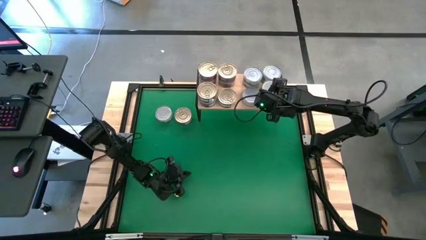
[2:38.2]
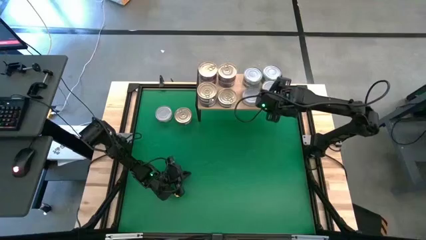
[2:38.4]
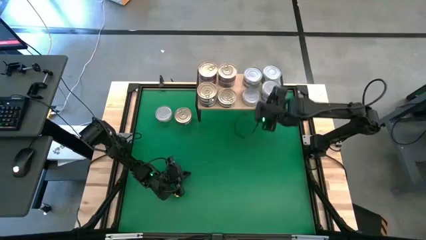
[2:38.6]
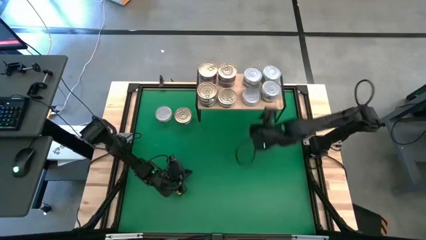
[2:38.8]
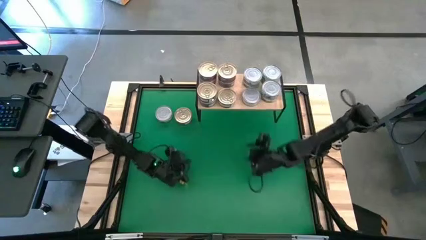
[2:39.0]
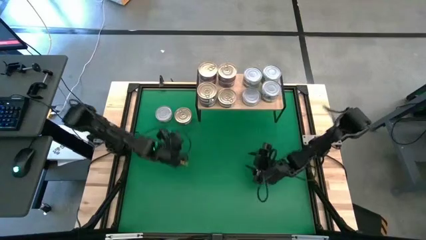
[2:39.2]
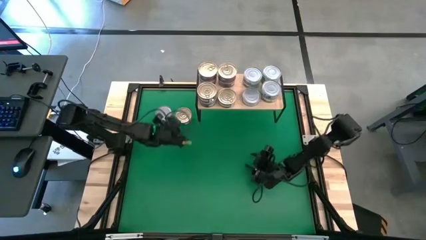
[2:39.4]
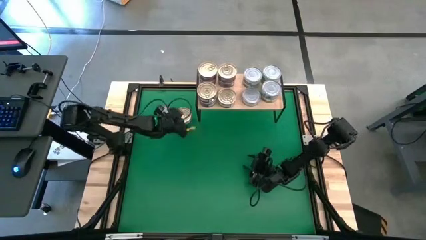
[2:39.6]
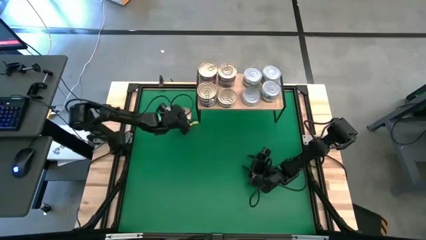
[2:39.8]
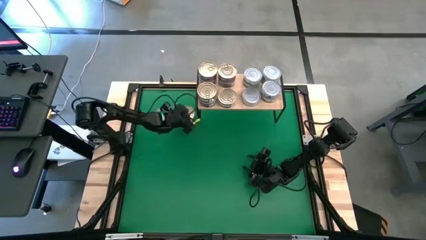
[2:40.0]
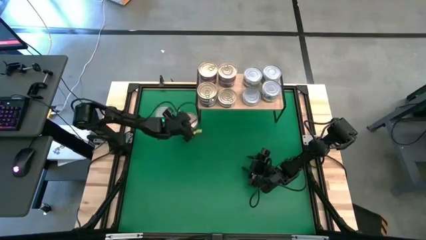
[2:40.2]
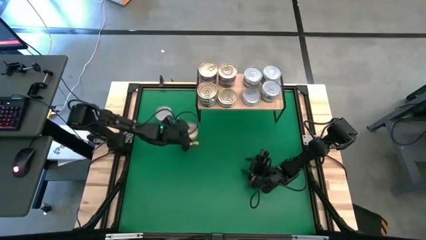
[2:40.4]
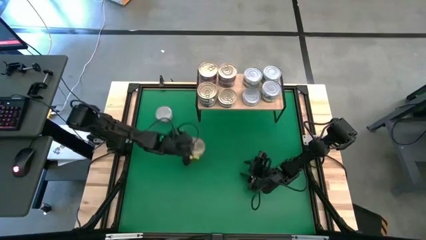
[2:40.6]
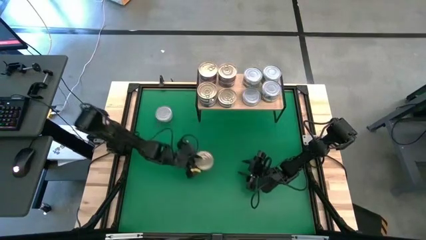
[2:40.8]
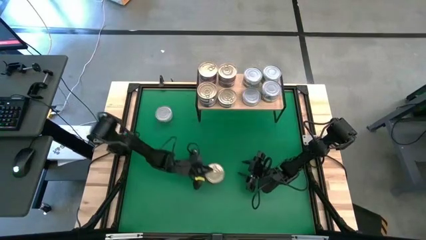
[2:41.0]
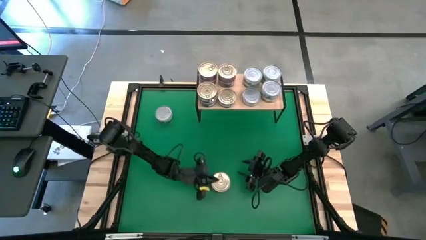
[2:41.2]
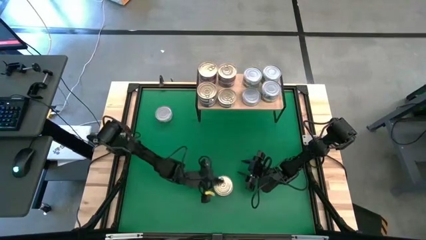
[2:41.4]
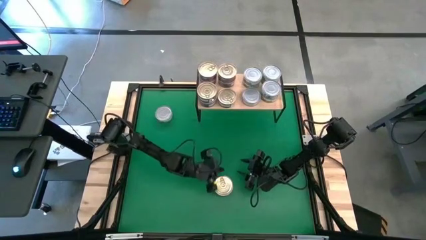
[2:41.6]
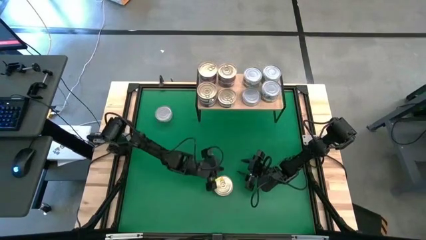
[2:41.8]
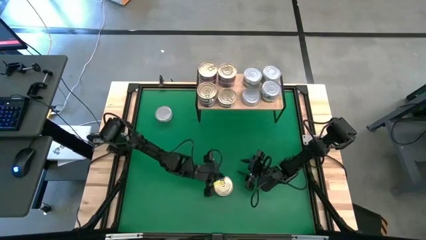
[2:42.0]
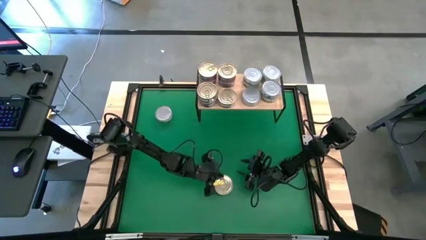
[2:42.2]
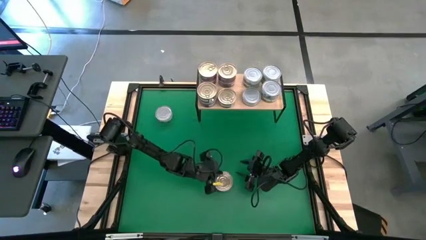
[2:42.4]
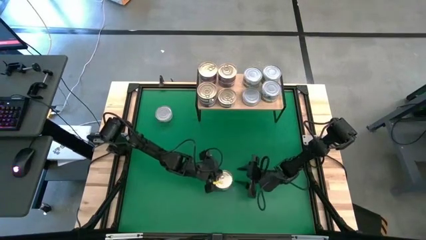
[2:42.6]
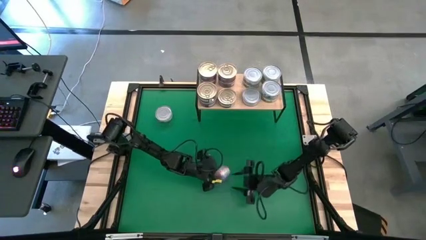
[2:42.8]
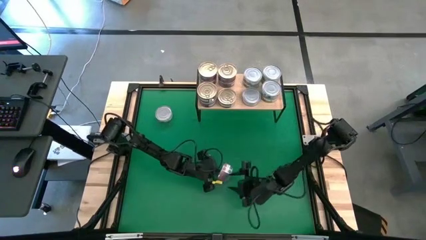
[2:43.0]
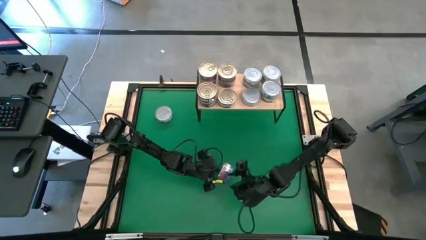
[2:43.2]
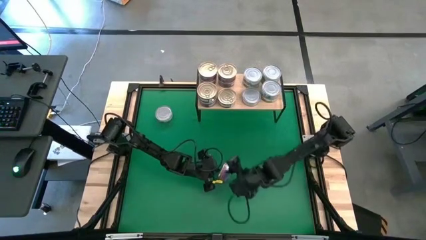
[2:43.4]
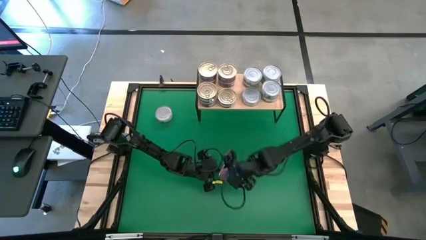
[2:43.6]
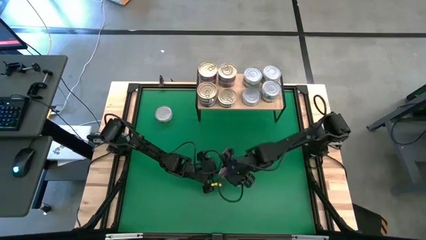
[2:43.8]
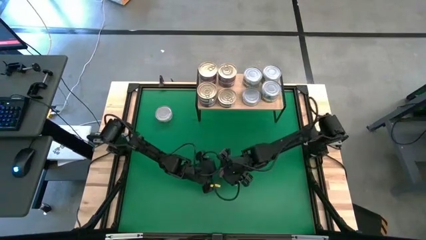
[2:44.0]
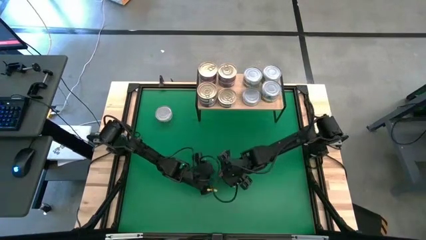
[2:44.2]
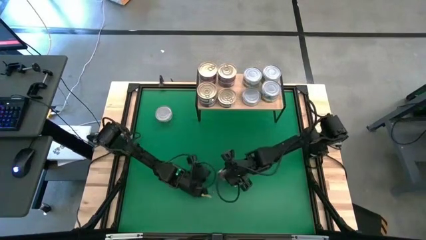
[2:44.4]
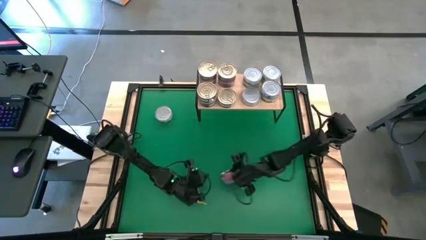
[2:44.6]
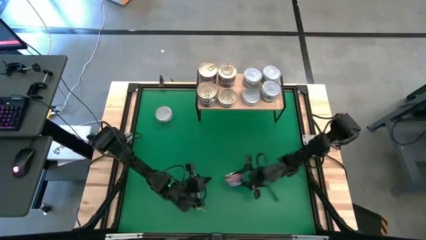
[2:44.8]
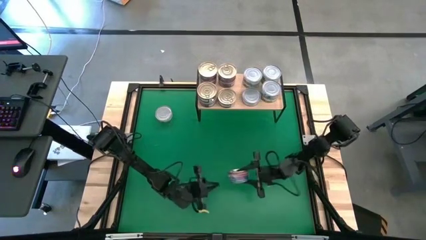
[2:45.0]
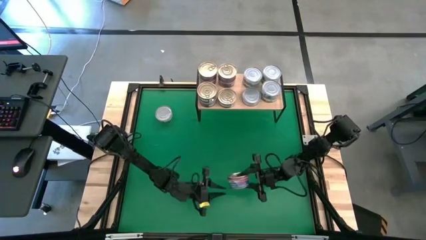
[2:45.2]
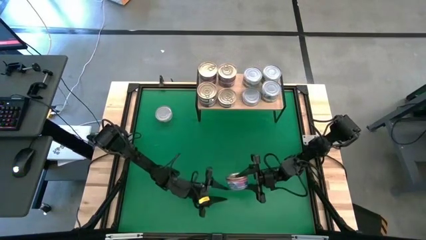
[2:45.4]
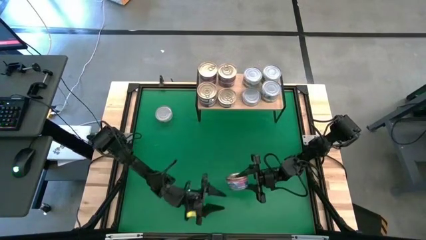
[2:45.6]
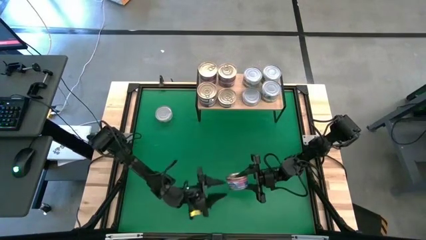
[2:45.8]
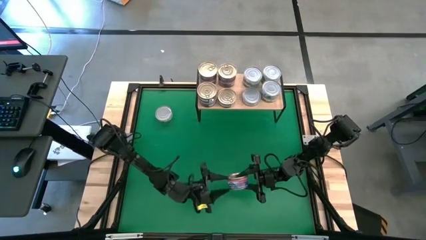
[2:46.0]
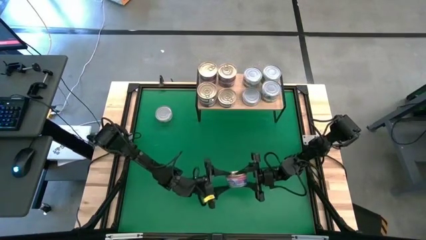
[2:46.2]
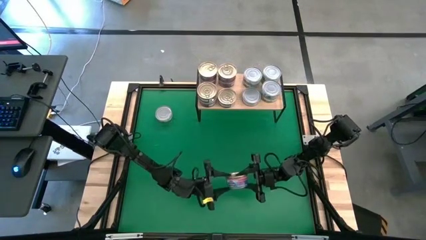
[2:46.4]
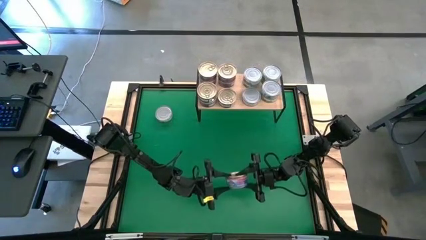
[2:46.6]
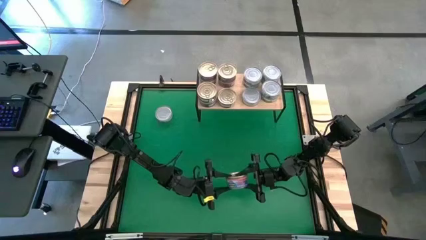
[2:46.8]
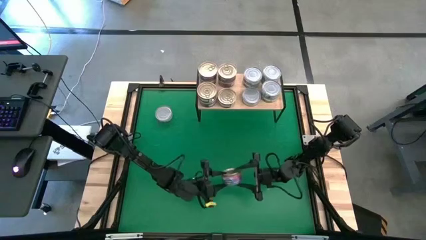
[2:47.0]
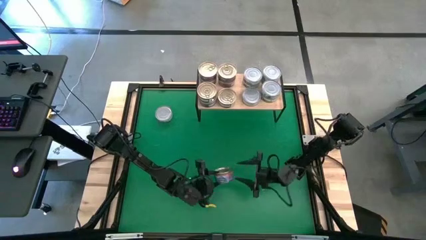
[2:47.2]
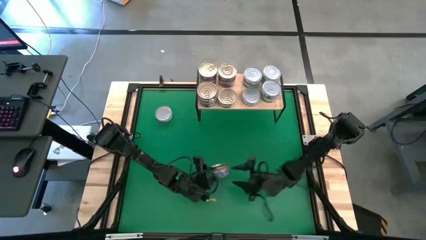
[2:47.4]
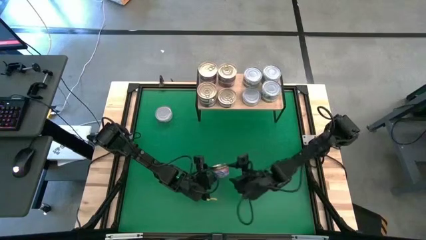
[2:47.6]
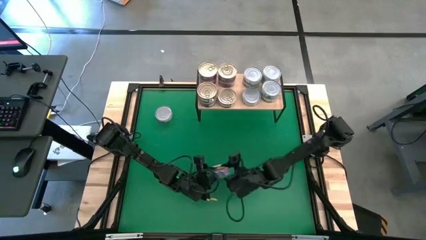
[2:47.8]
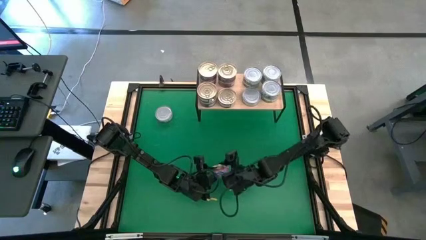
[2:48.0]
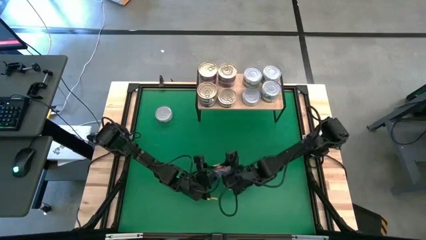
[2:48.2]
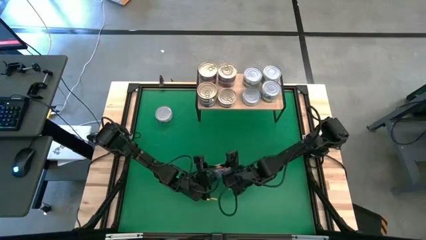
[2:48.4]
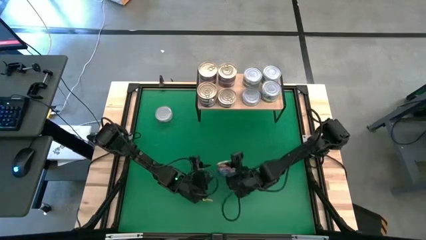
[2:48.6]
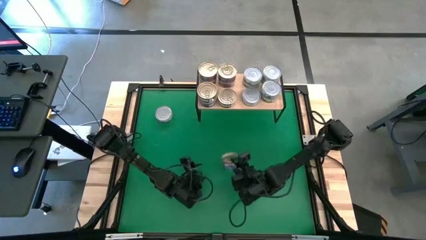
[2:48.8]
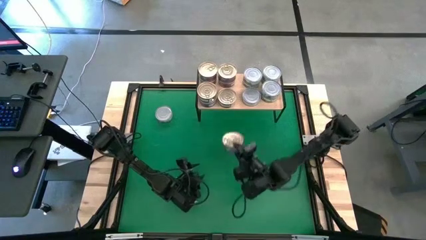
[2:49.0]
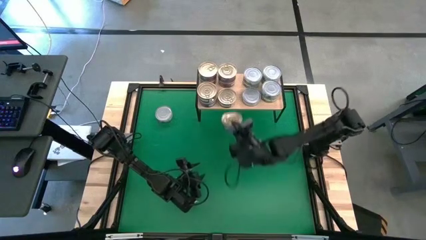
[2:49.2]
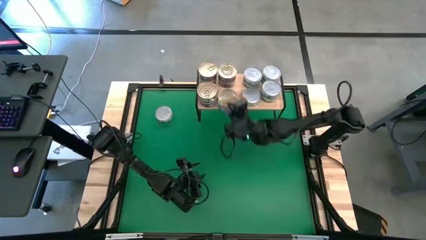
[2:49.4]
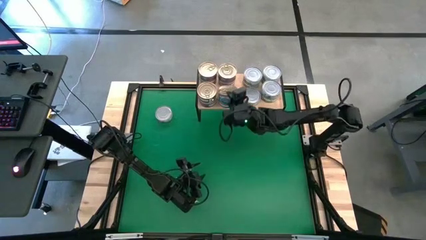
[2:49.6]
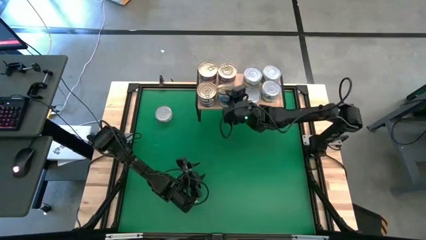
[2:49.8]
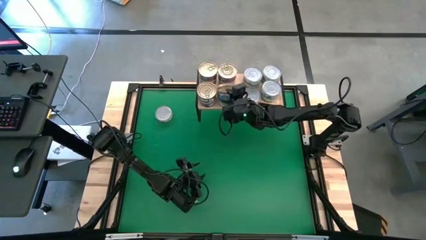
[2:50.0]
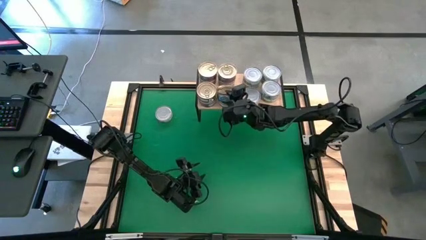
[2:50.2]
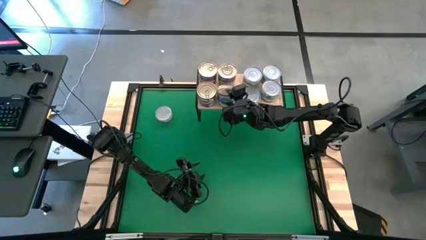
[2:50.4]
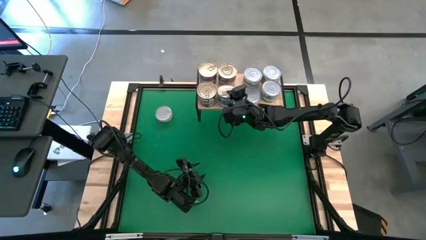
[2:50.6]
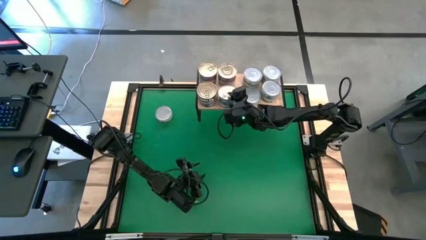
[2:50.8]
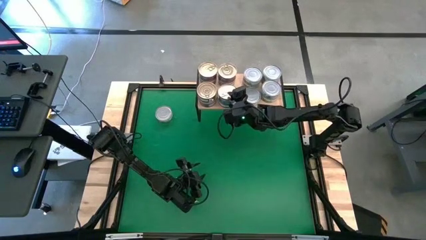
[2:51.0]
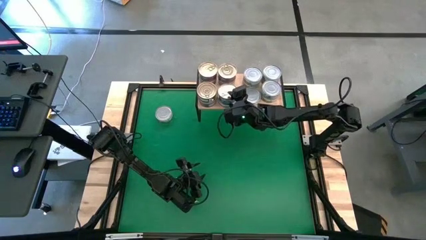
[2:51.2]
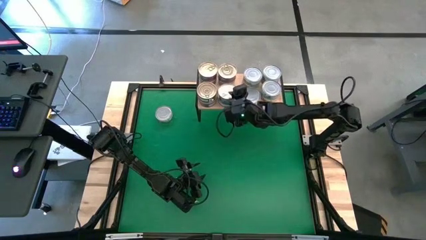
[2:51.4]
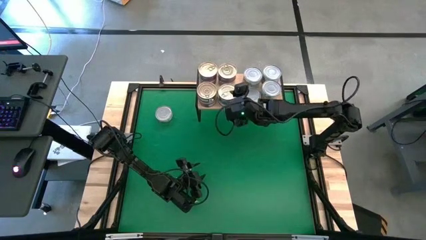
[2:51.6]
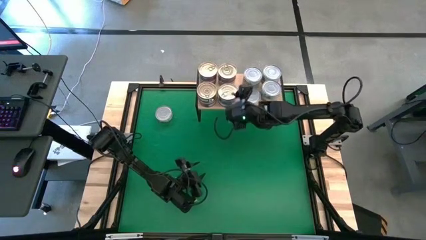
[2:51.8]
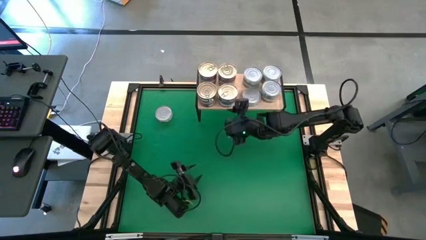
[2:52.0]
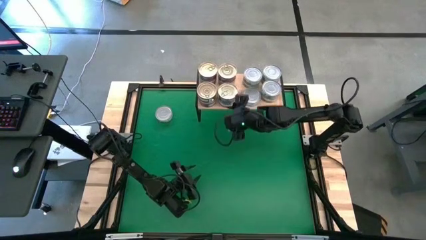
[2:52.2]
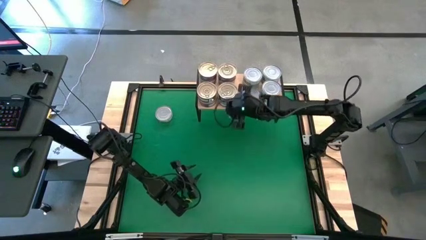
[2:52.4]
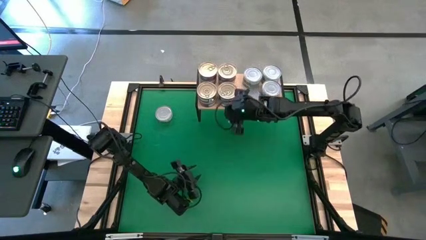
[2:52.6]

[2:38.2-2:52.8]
Task: Stack canned seafood by type on shelf
Stack the blue pink tuna can on top of the bottom right blue pink tuna can on the shelf

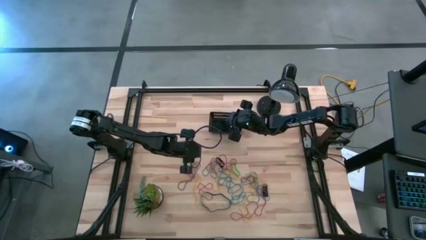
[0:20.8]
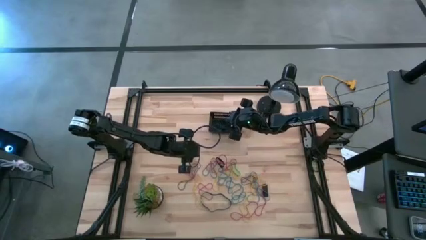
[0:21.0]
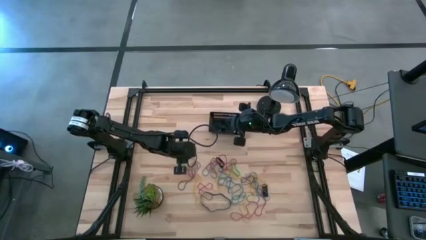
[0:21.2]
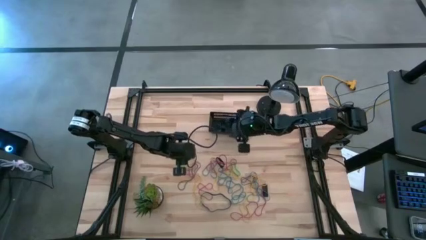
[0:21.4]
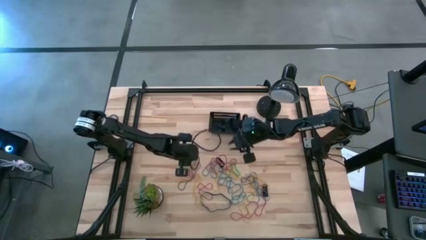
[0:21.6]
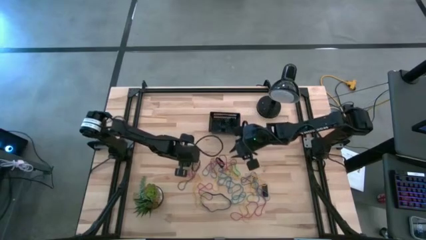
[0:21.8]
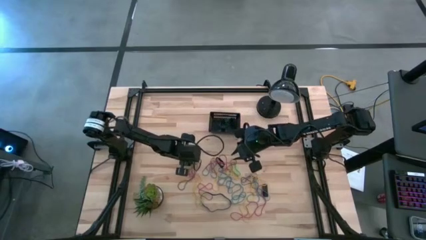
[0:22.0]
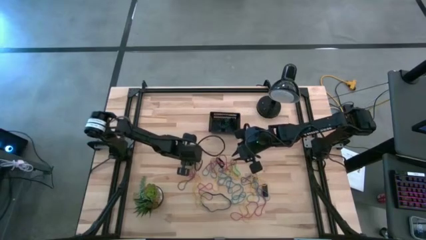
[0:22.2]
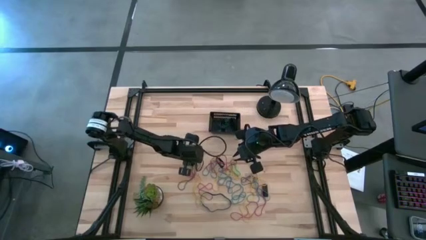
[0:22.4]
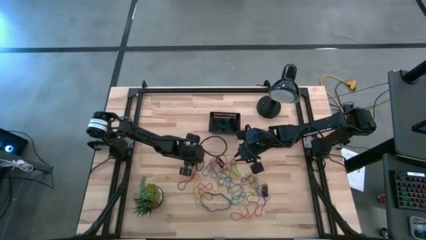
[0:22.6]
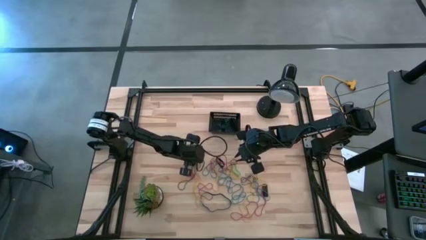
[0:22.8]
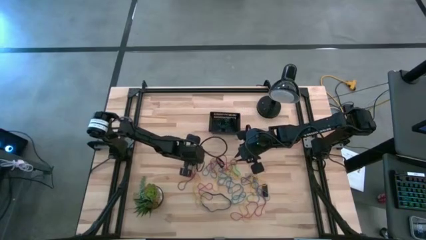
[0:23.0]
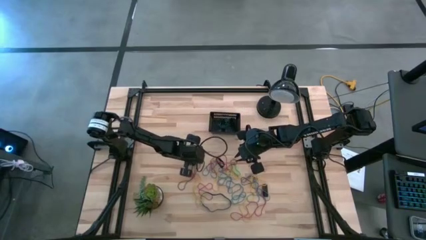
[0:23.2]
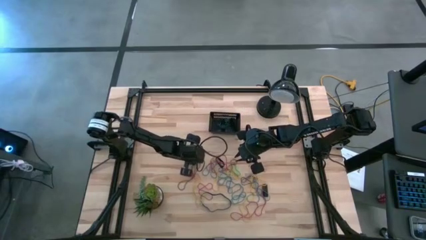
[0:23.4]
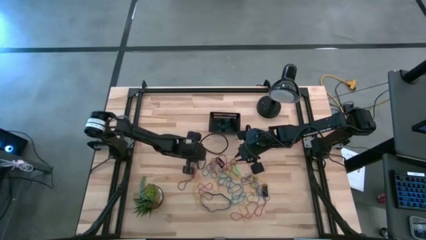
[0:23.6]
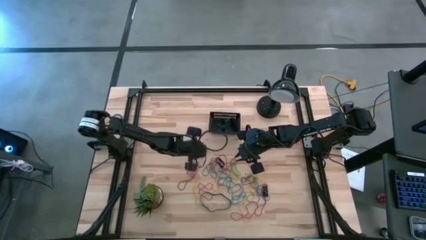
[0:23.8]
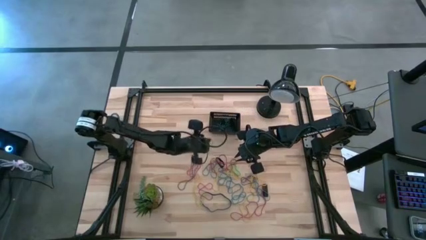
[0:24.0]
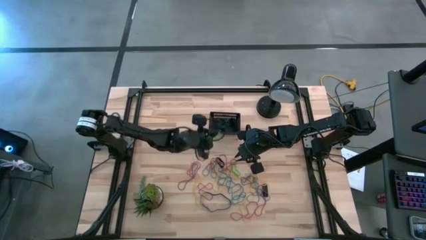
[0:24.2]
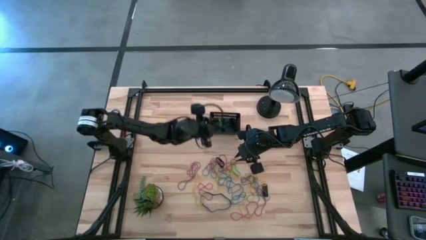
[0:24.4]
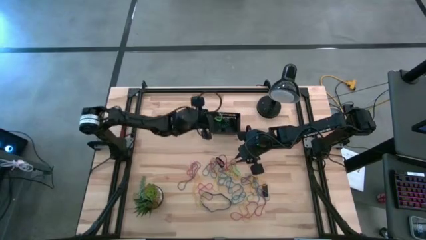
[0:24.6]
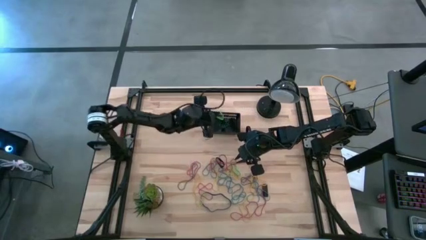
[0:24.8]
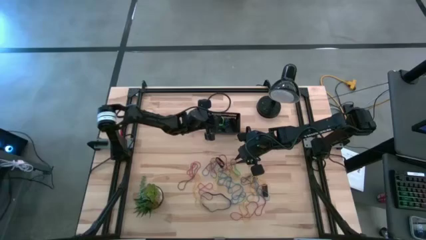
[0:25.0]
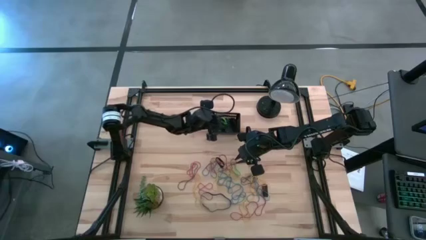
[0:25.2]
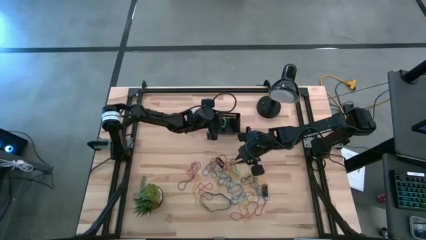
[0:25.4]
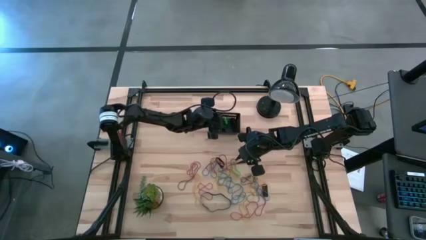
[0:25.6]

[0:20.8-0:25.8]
Task: Pick and place rubber bands into bin
Put the green rubber band into the basket
